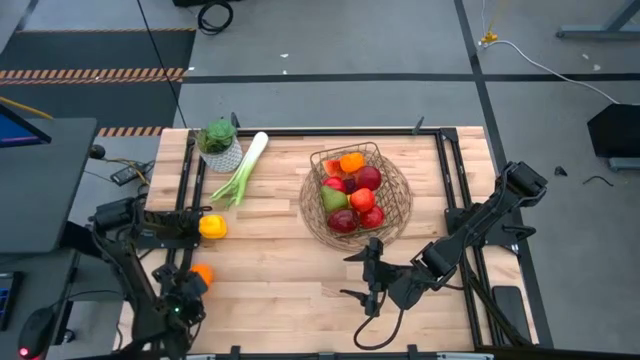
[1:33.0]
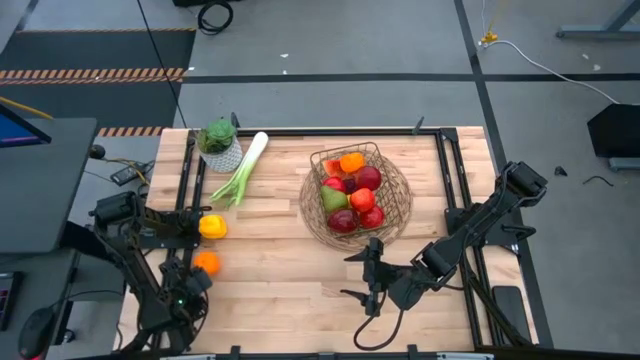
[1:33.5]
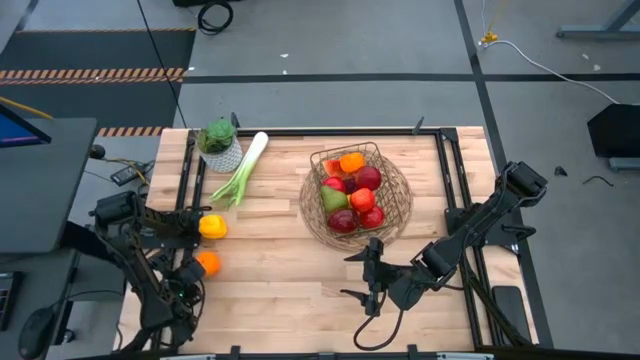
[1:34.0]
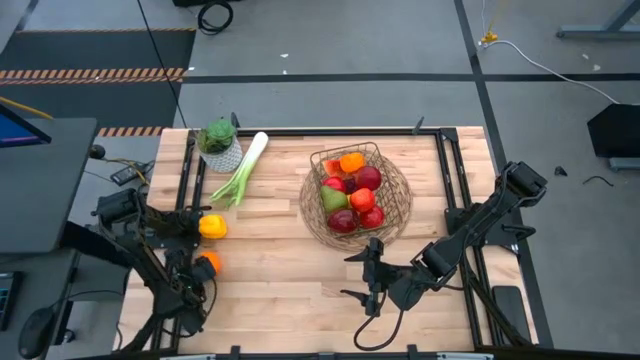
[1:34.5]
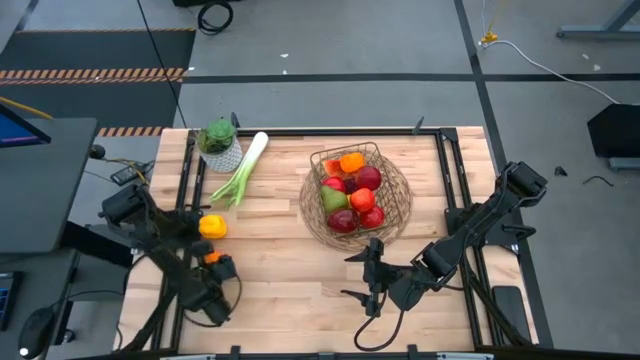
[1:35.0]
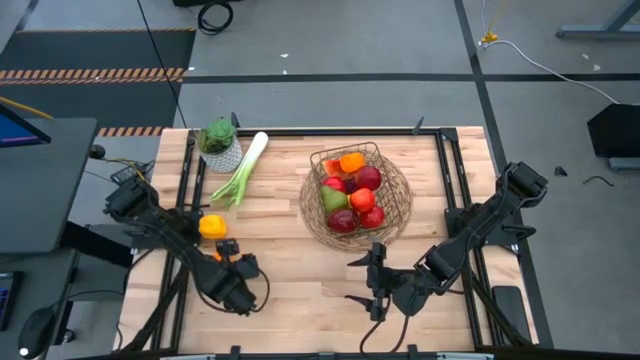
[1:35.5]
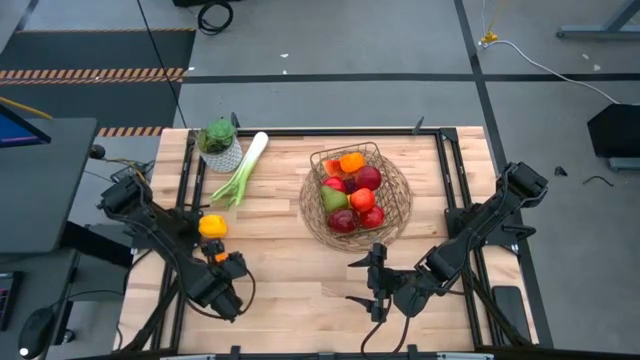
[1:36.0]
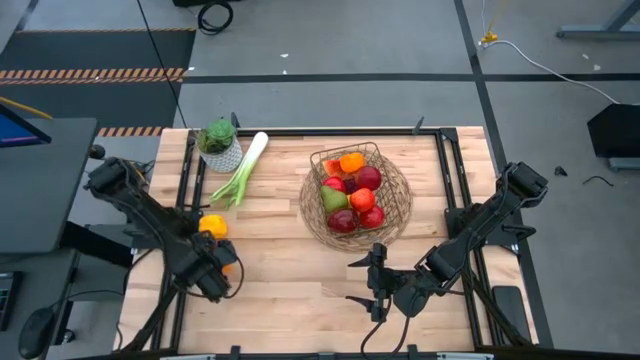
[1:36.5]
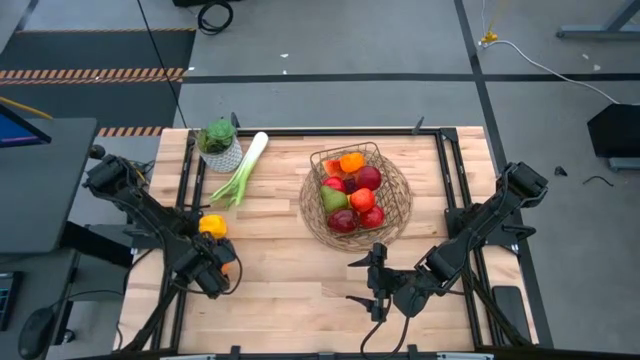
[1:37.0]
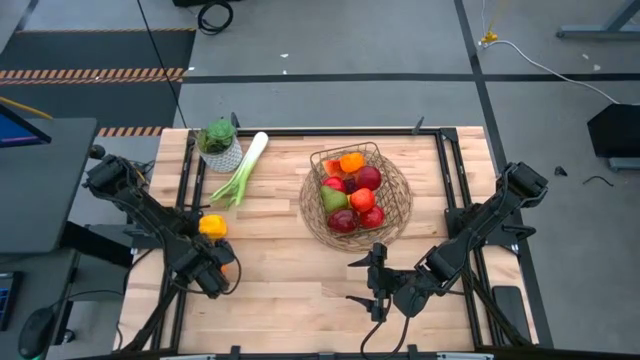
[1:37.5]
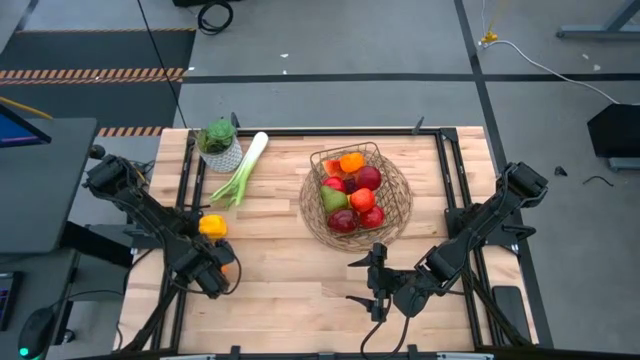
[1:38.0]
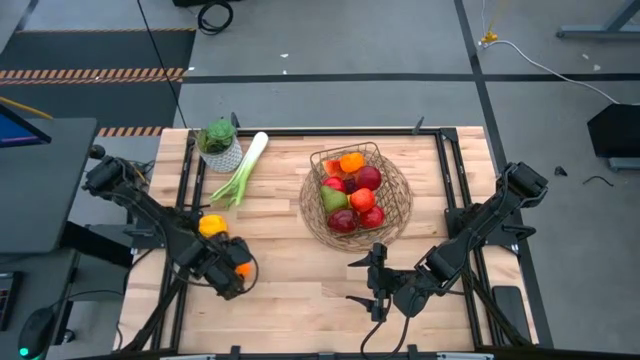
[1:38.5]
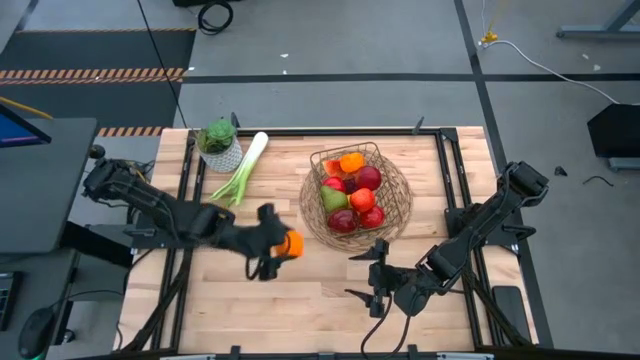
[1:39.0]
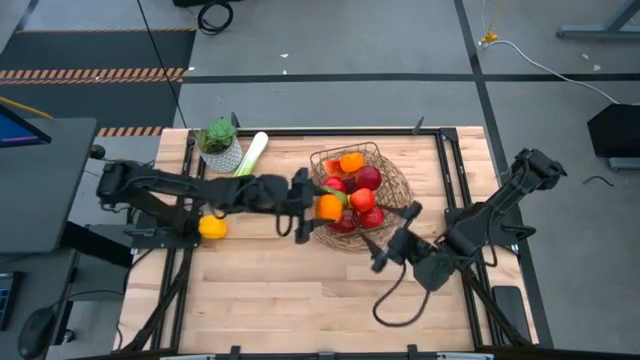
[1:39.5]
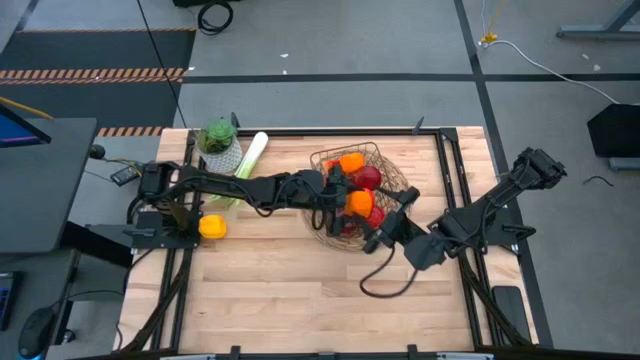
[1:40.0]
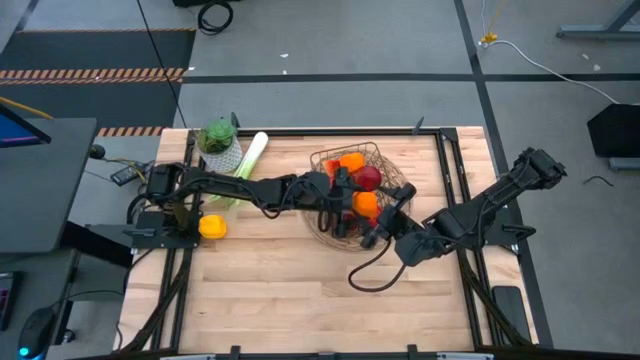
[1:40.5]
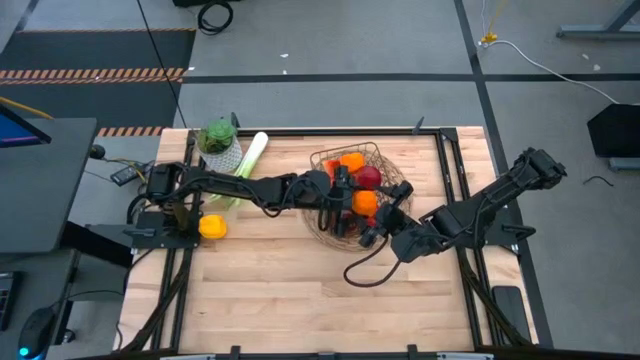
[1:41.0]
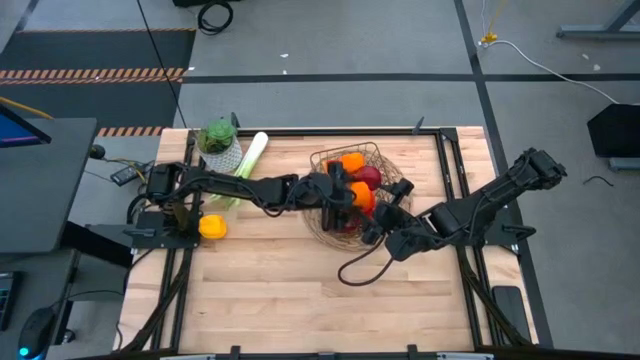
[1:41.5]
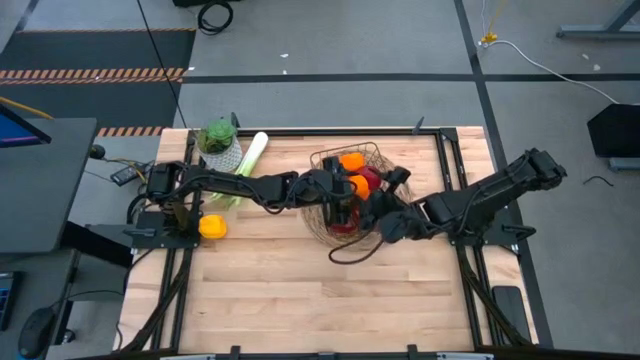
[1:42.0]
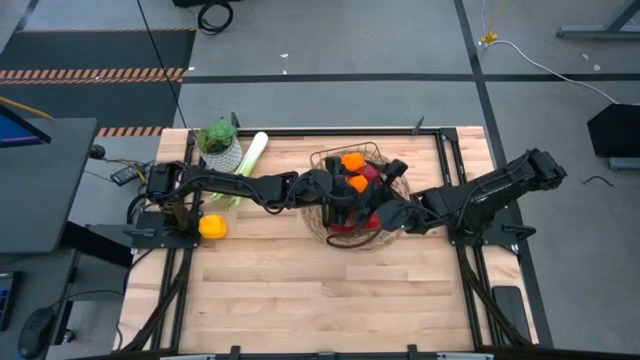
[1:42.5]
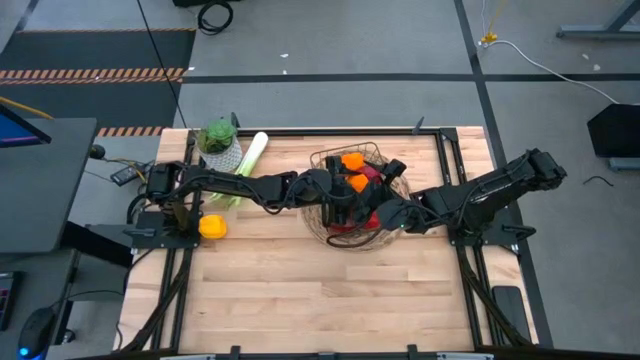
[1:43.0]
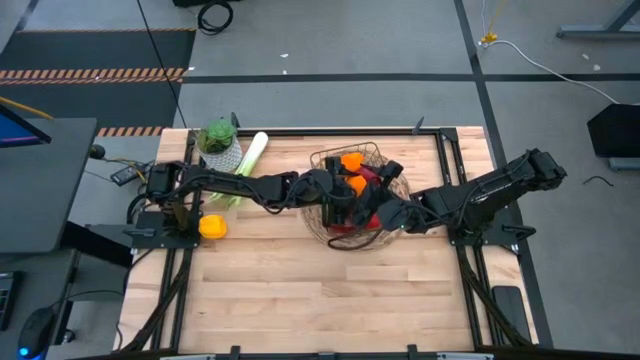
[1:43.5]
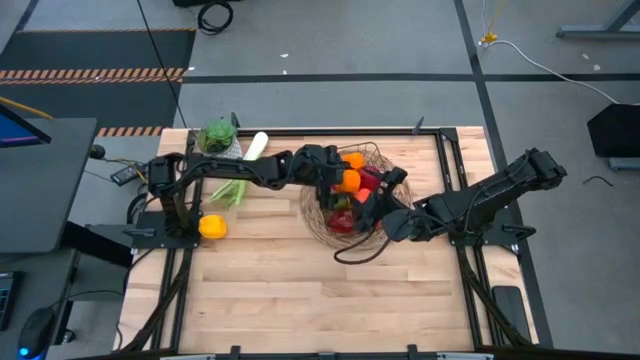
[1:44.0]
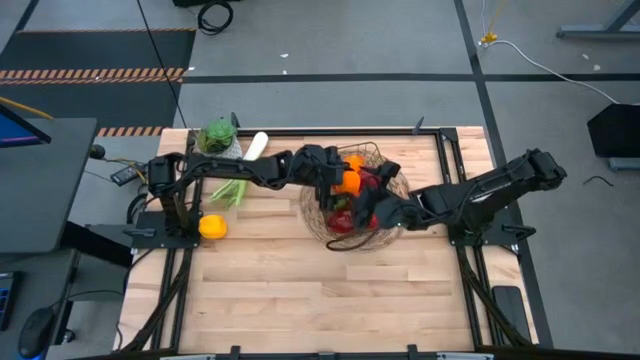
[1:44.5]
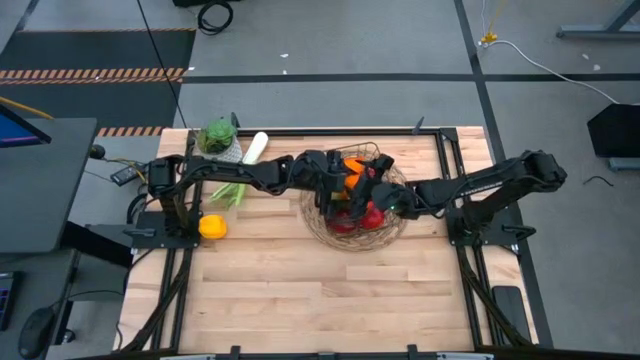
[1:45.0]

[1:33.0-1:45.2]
Task: Build produce basket
Put the orange into the wire basket

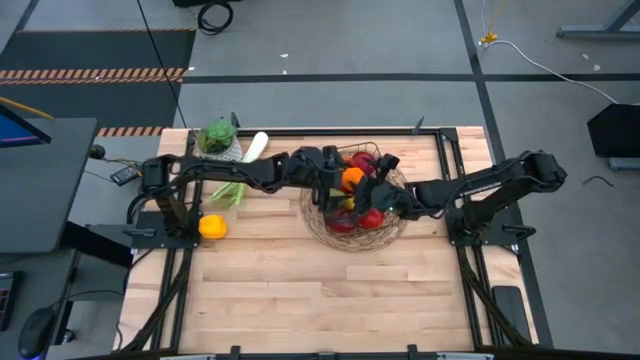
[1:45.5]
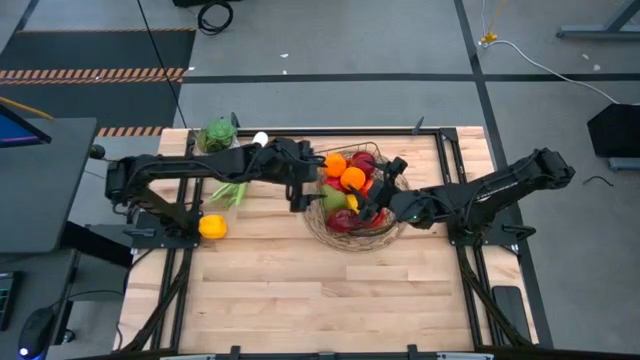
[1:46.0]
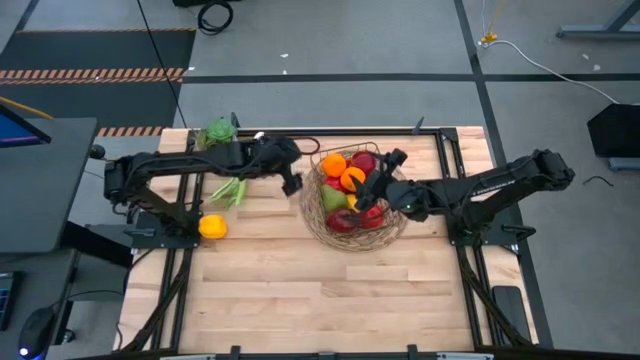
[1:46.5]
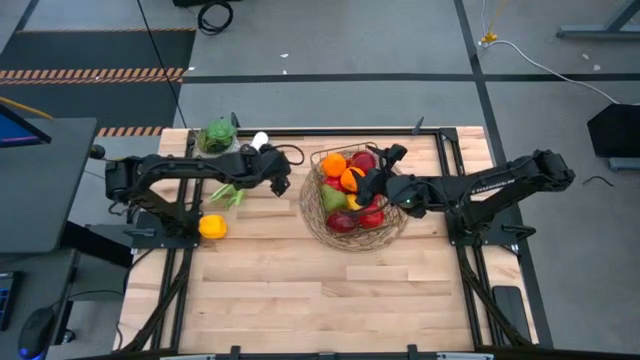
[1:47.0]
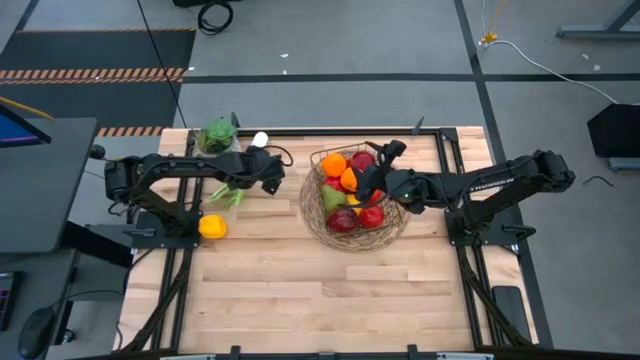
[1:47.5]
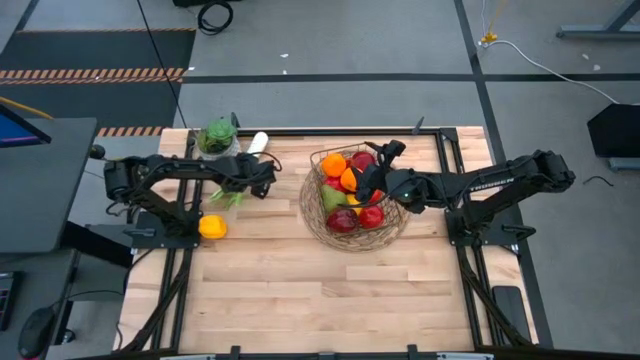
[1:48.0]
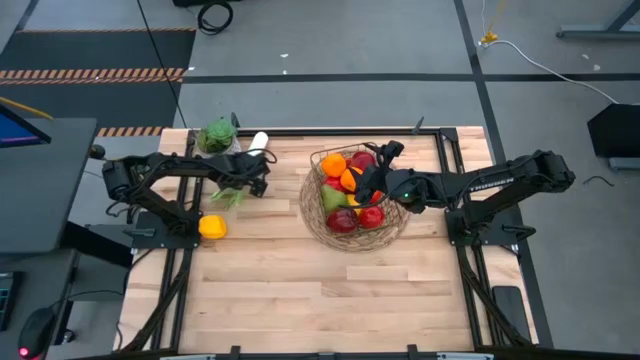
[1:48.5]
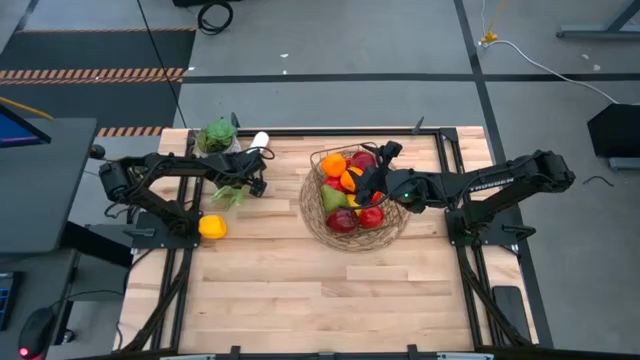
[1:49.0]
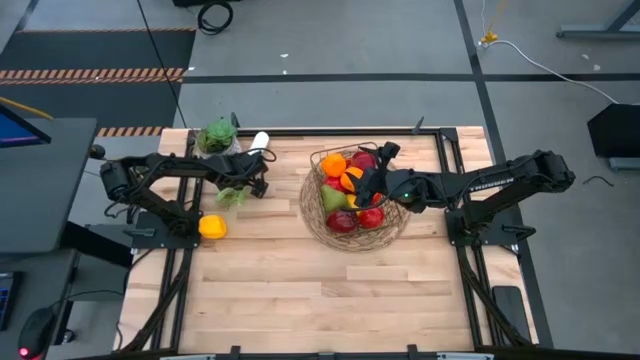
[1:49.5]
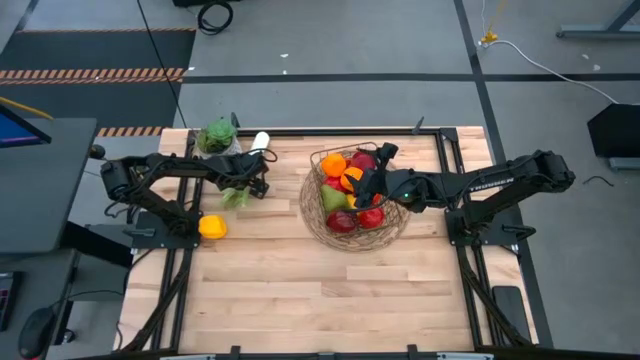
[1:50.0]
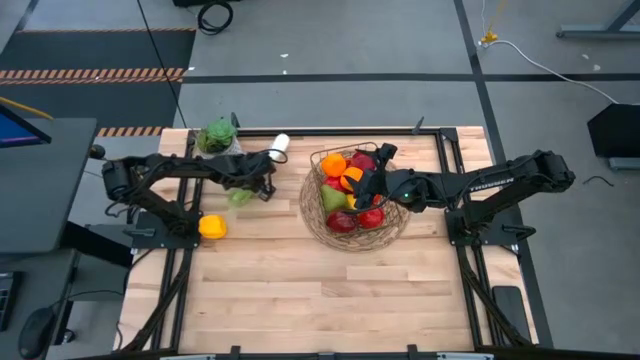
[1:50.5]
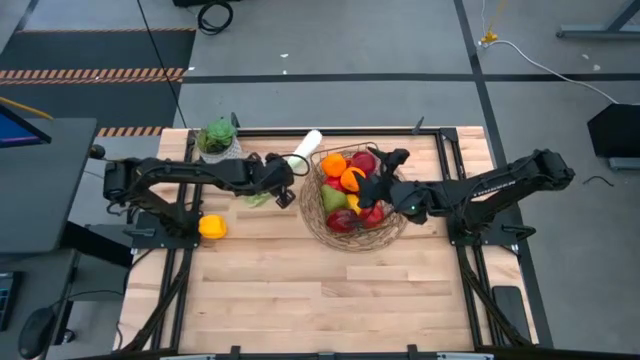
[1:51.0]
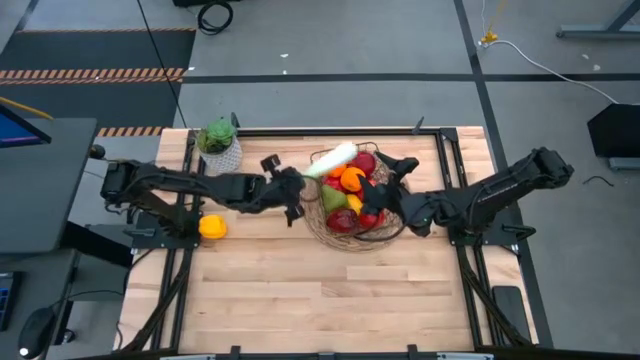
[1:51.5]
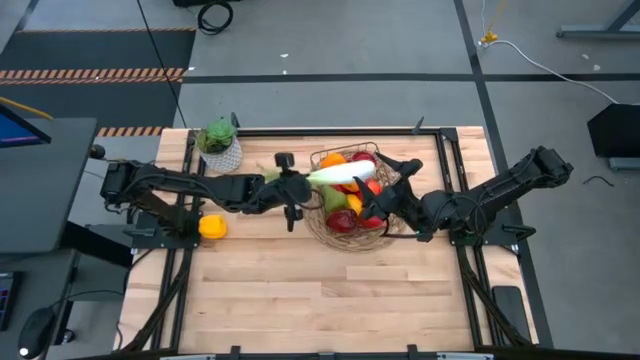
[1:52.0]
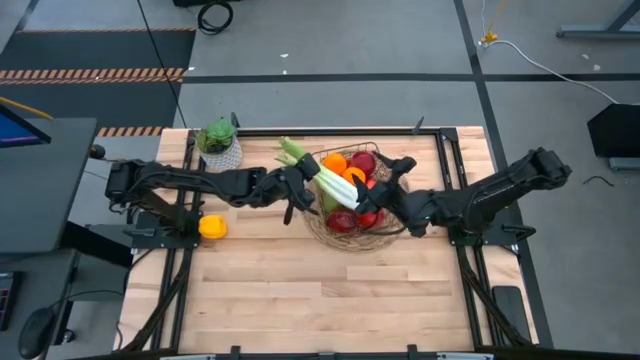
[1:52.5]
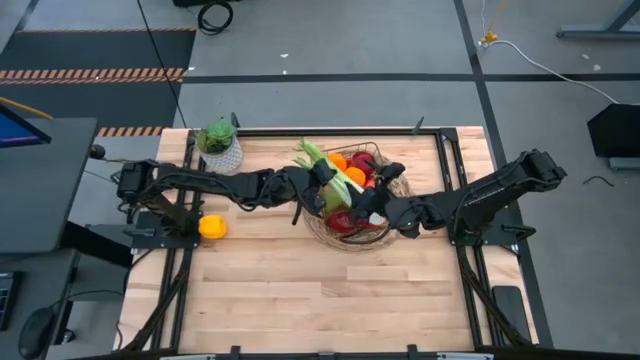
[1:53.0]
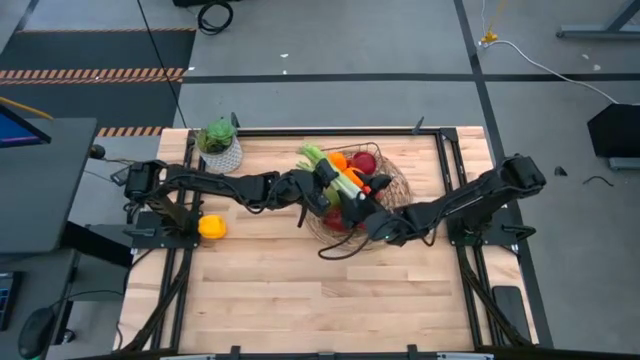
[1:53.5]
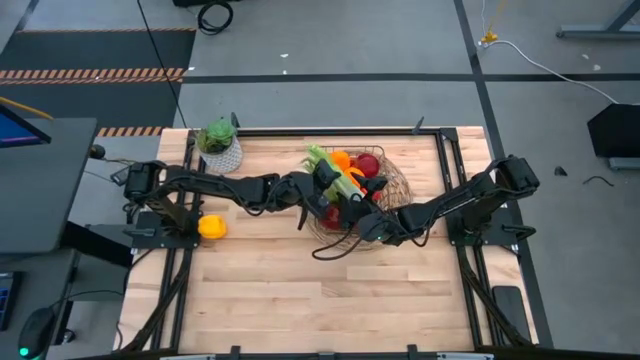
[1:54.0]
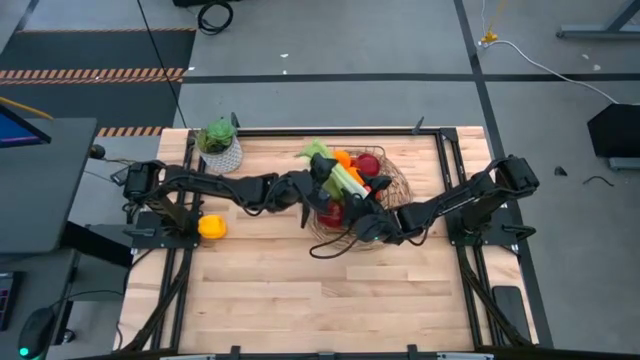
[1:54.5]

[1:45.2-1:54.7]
Put the green celery into the wire basket
